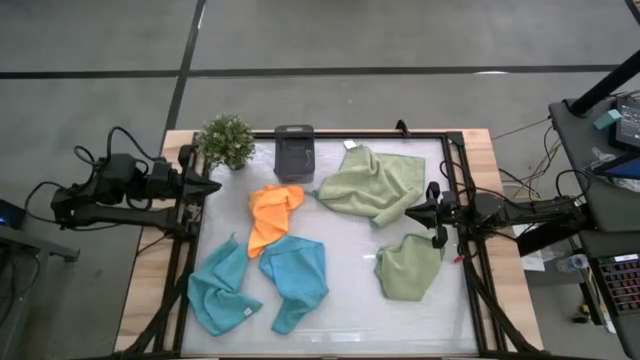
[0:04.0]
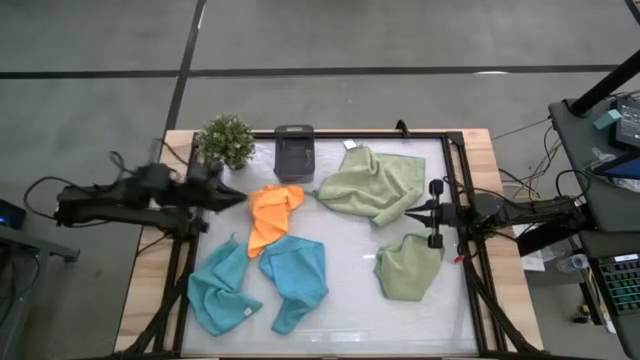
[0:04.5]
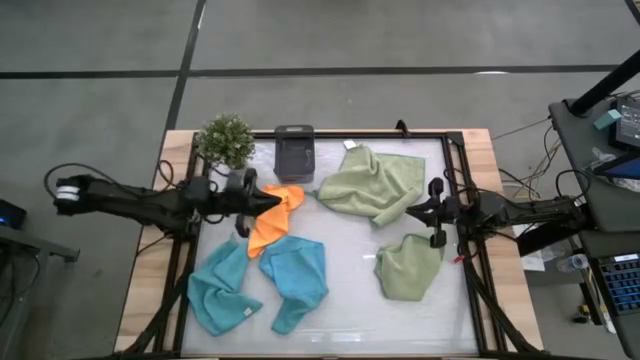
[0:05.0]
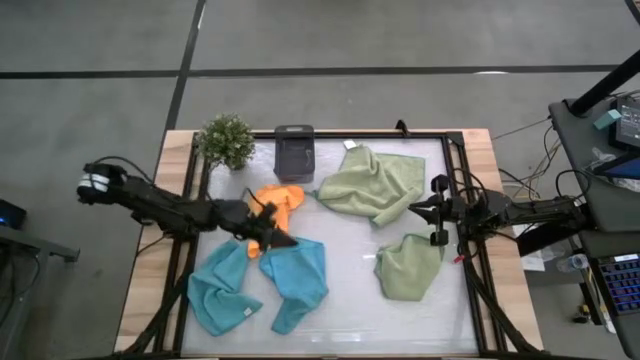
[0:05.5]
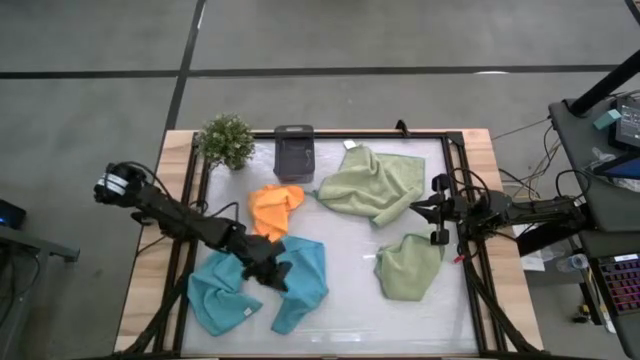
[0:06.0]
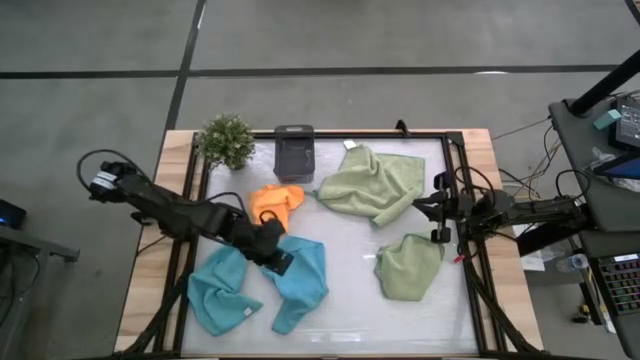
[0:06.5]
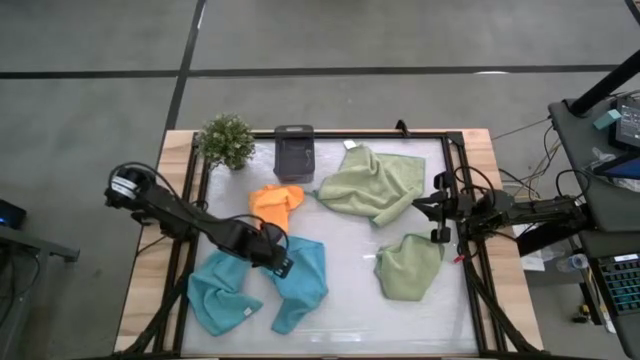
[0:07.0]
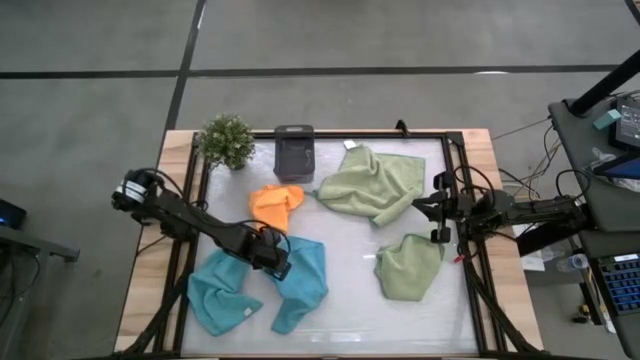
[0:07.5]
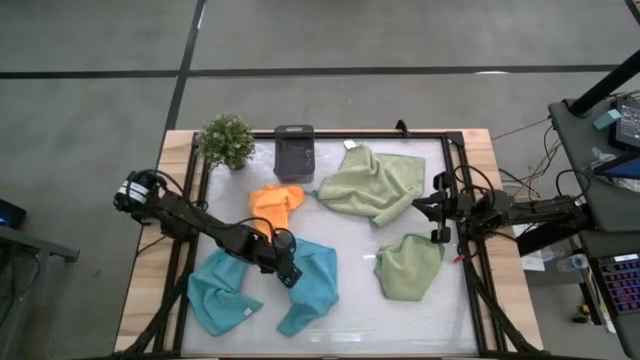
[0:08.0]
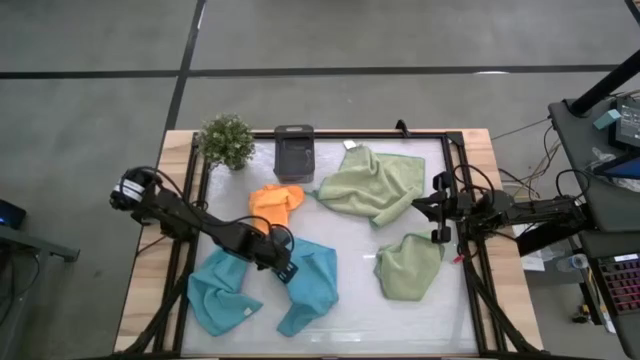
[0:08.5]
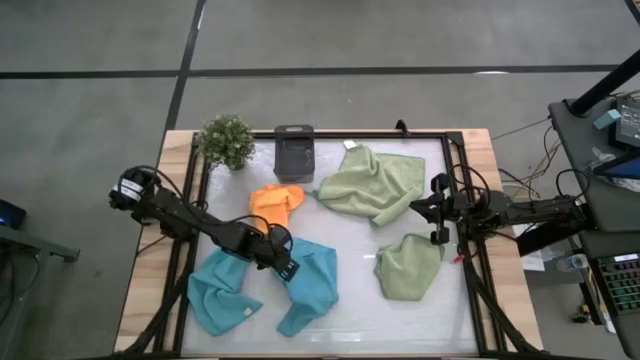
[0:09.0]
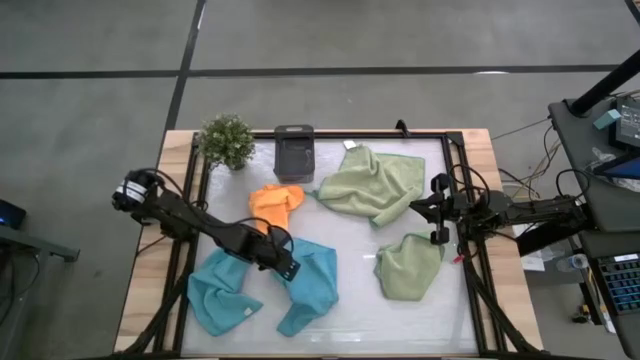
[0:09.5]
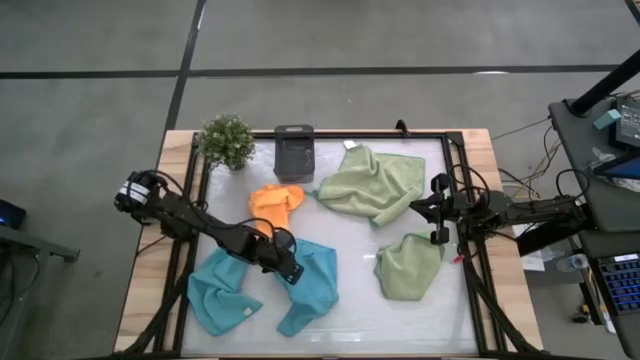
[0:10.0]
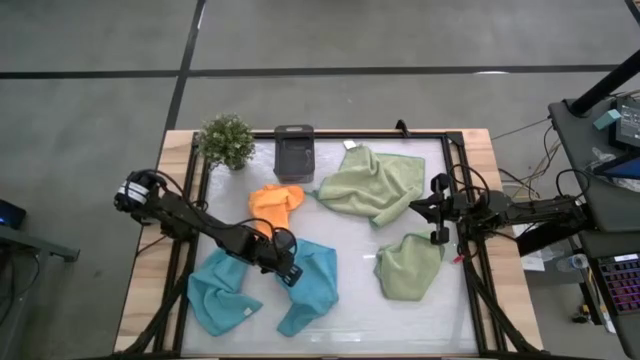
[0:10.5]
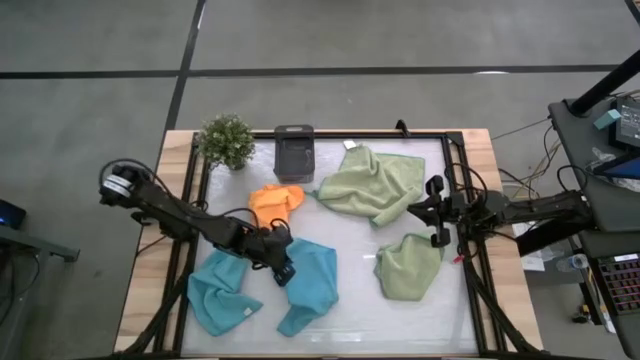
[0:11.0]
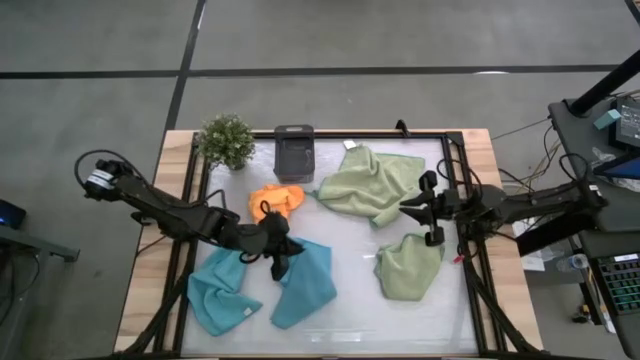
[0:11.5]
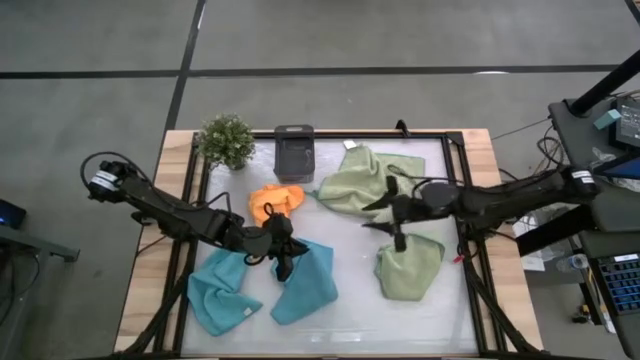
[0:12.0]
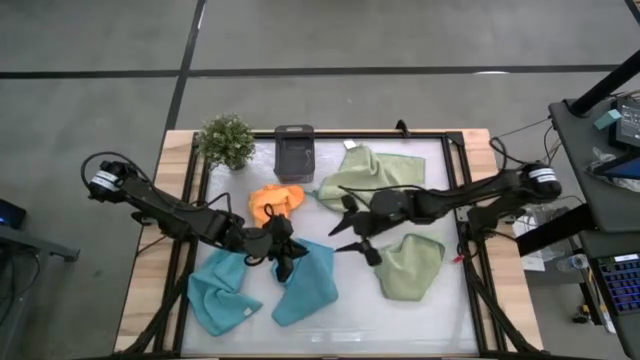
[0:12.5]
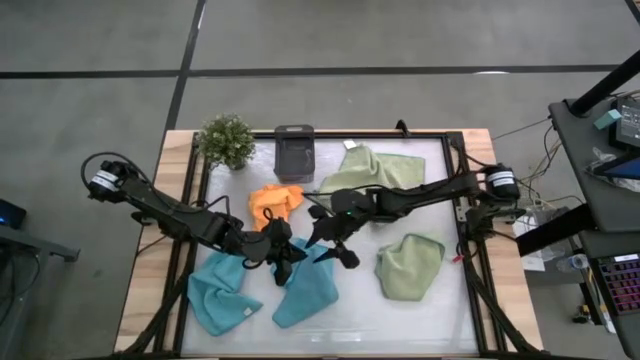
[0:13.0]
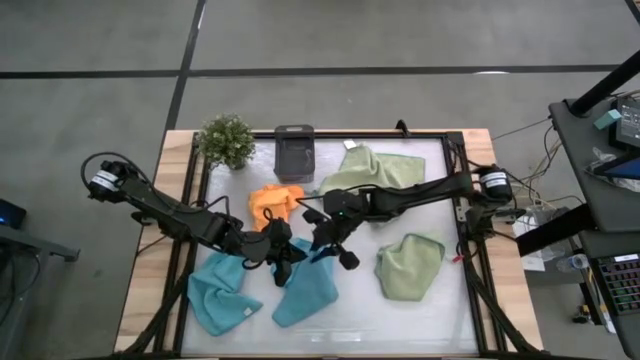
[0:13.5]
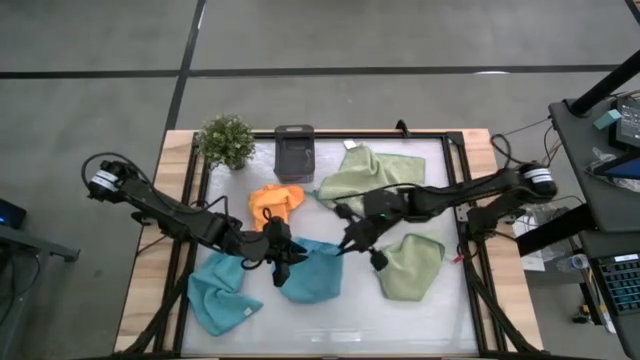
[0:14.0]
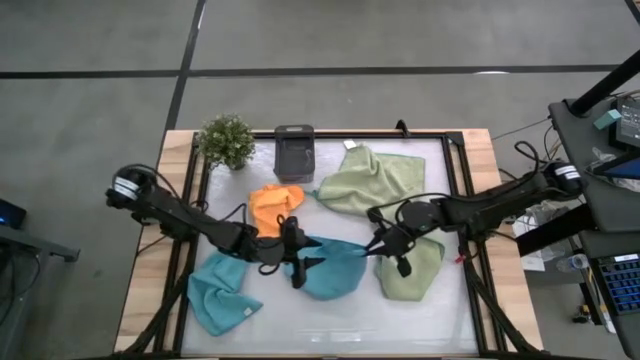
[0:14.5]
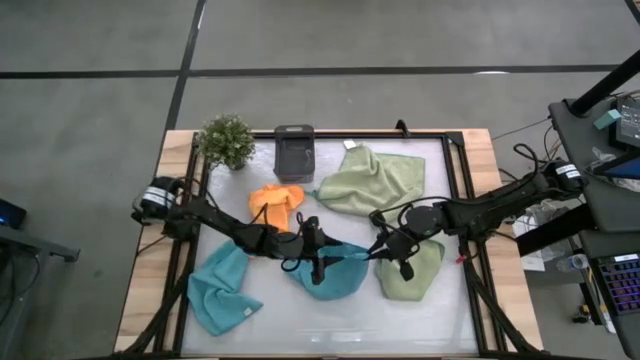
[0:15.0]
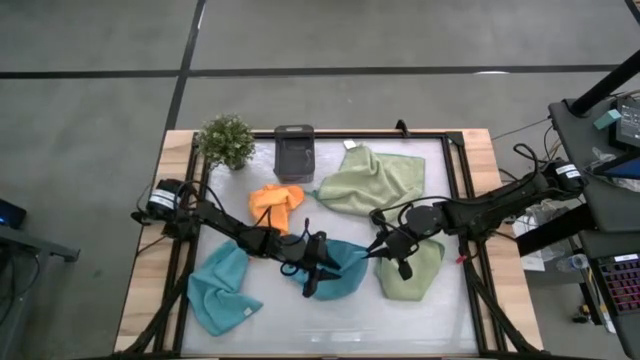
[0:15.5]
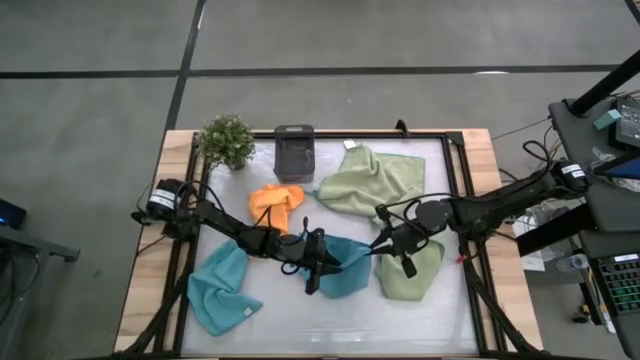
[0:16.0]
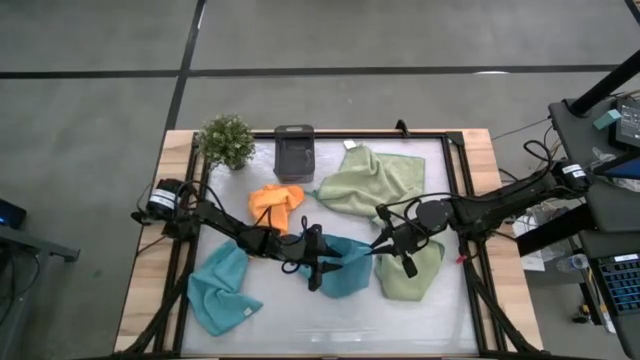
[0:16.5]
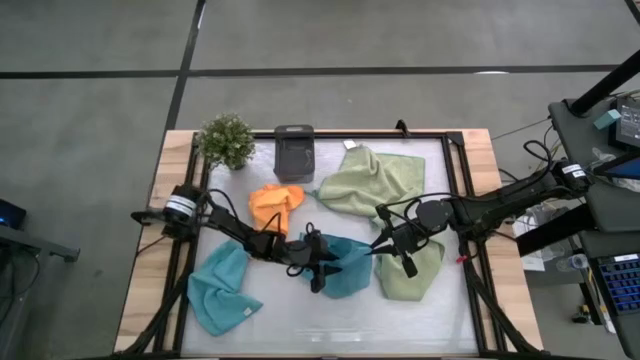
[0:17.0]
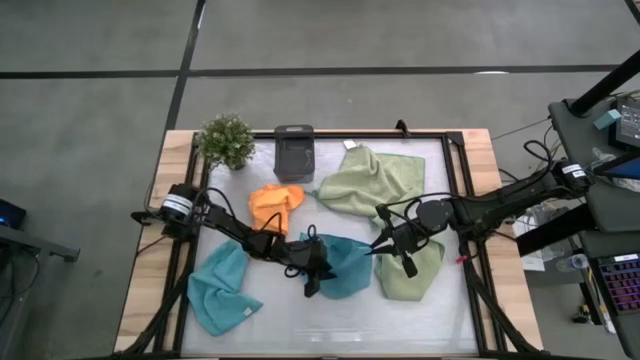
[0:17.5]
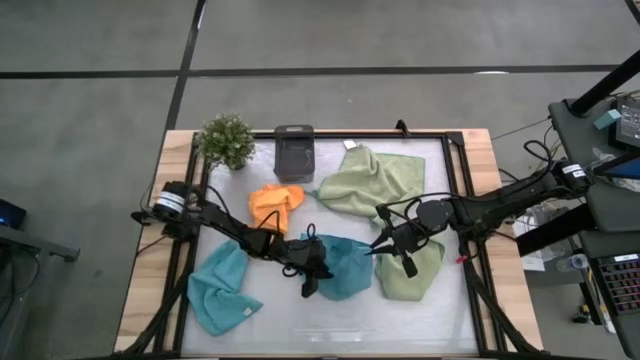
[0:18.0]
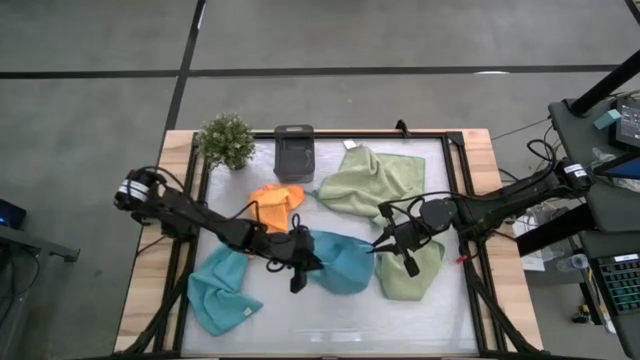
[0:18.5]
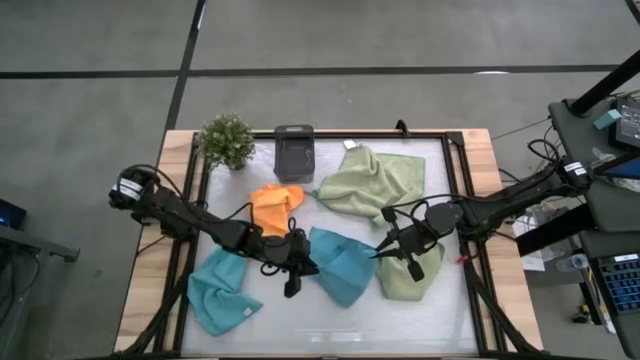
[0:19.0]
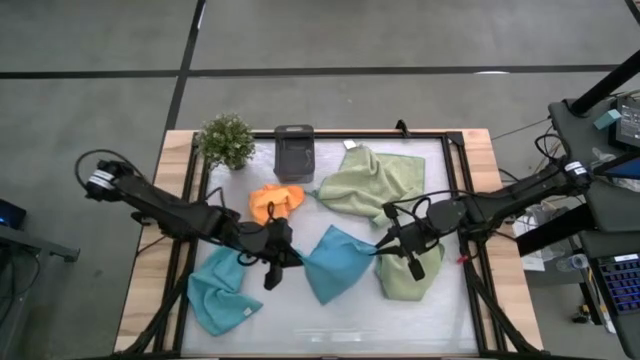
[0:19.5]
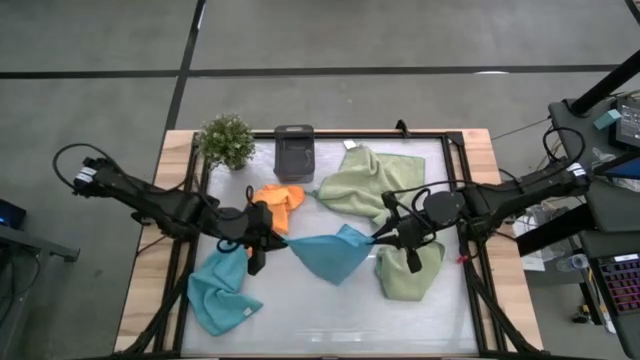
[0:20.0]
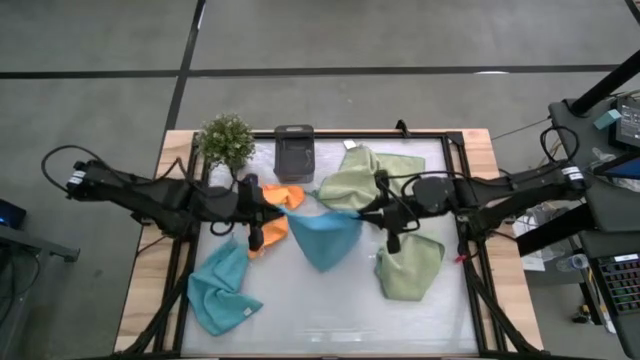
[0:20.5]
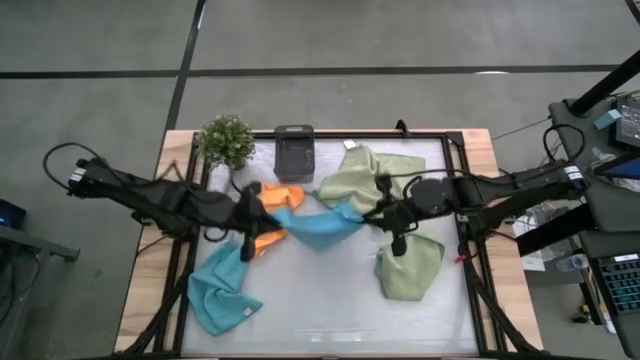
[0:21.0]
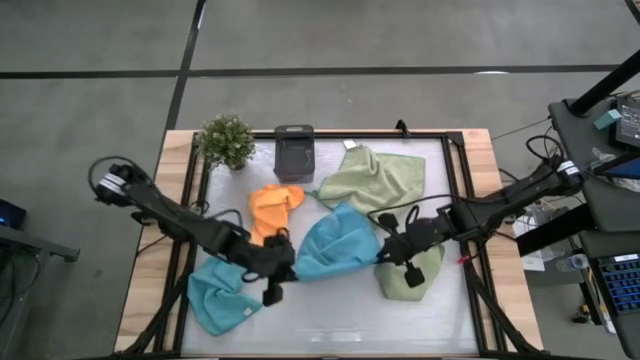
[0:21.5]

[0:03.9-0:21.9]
Task: Fold microfiber towels
Fold the right blue towel
